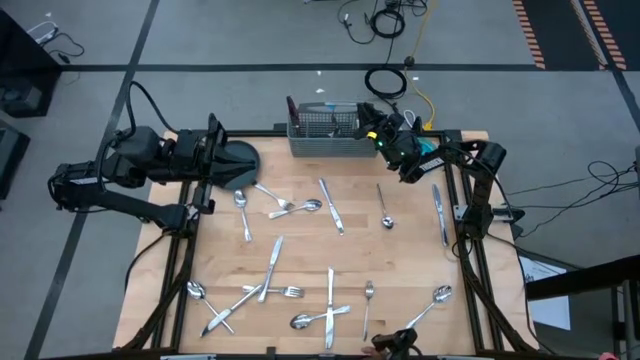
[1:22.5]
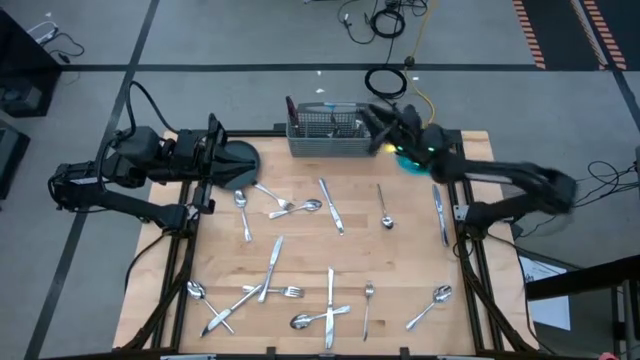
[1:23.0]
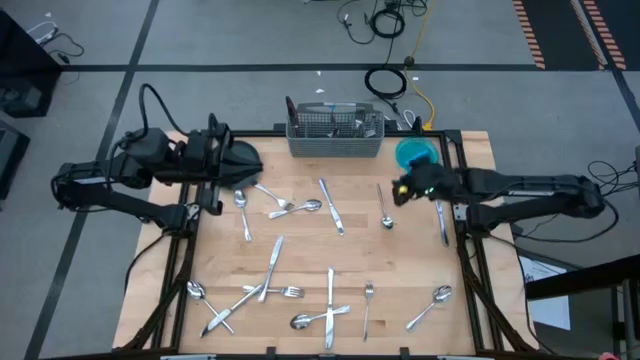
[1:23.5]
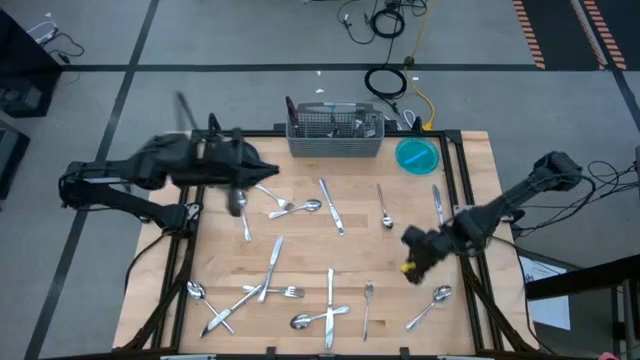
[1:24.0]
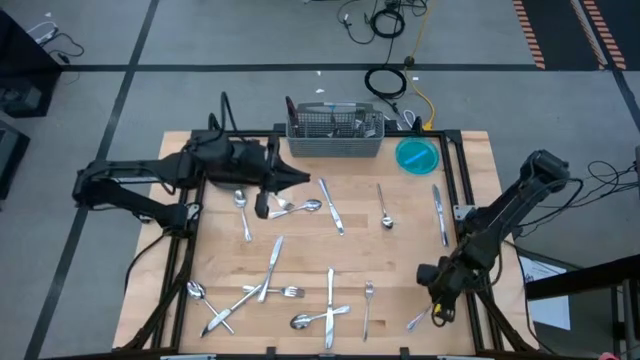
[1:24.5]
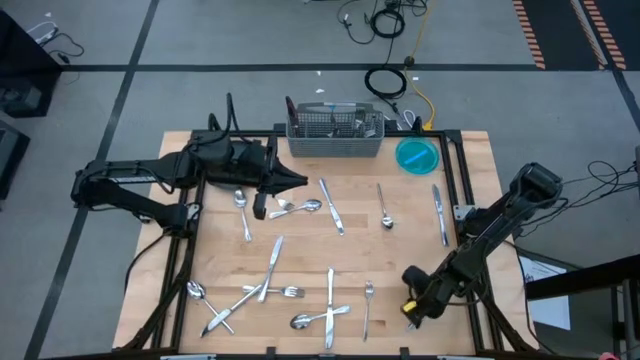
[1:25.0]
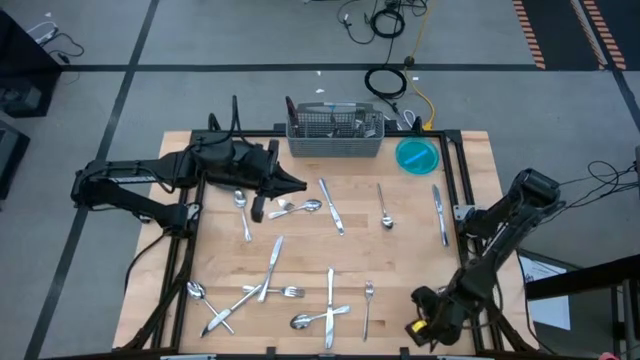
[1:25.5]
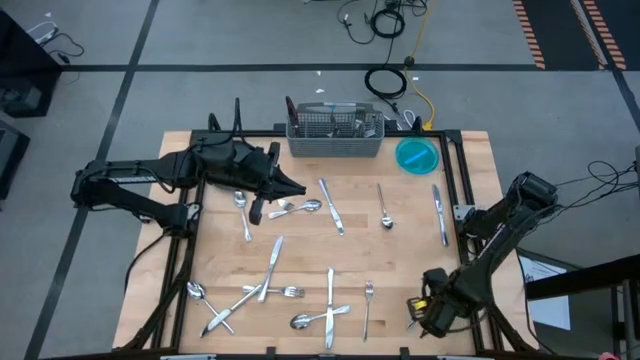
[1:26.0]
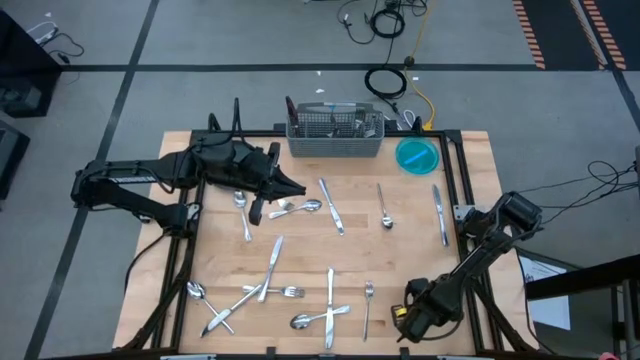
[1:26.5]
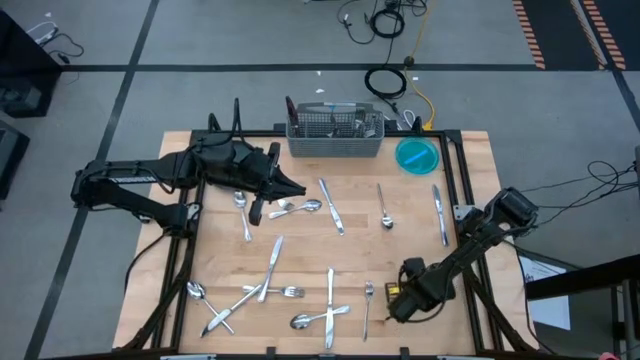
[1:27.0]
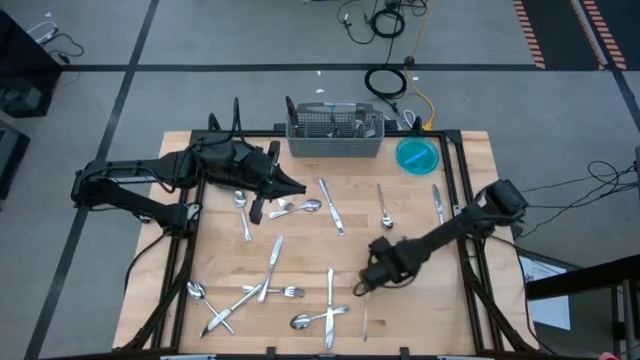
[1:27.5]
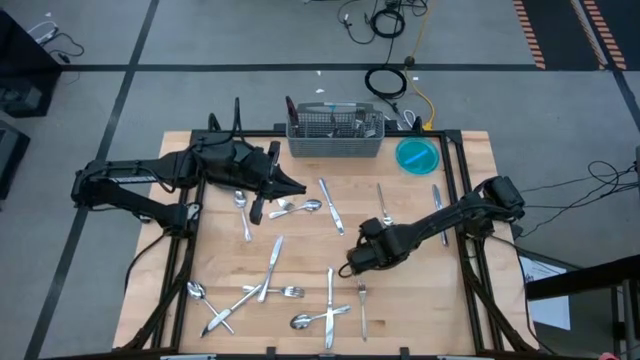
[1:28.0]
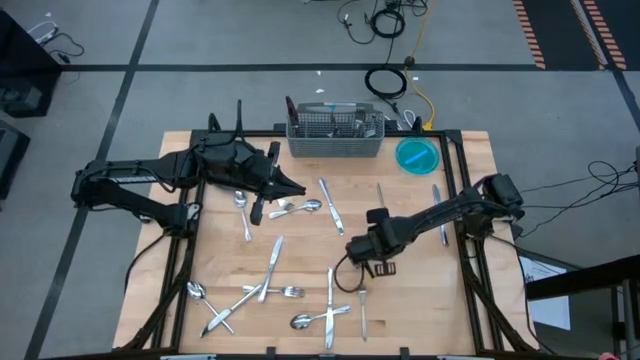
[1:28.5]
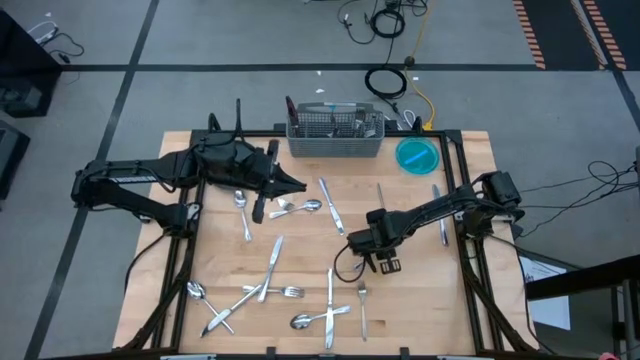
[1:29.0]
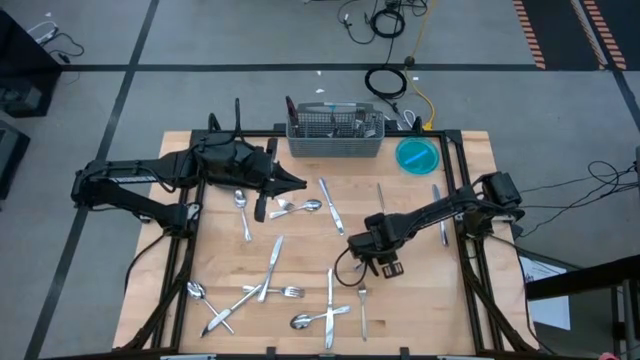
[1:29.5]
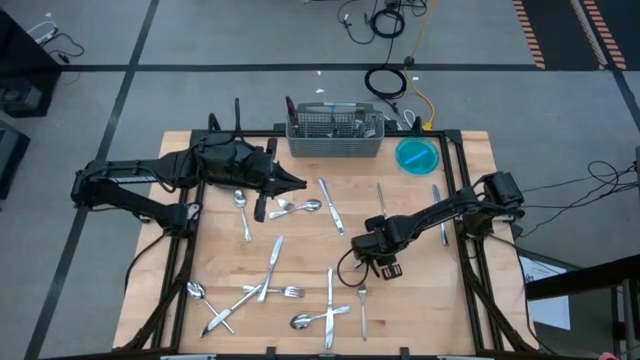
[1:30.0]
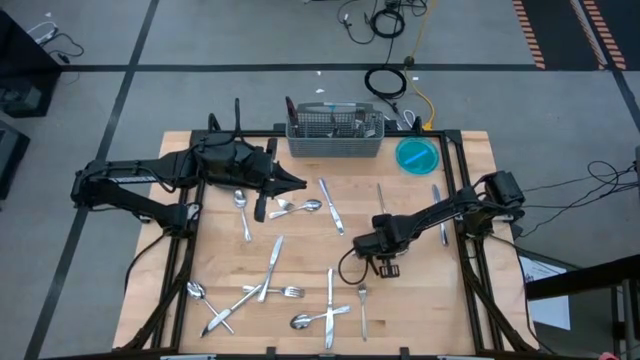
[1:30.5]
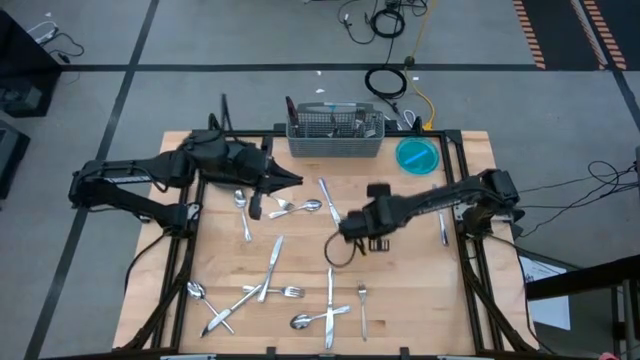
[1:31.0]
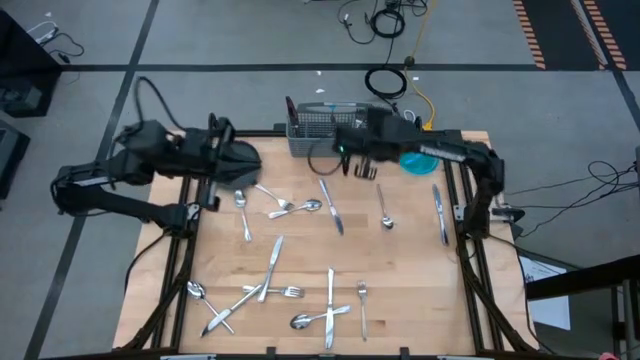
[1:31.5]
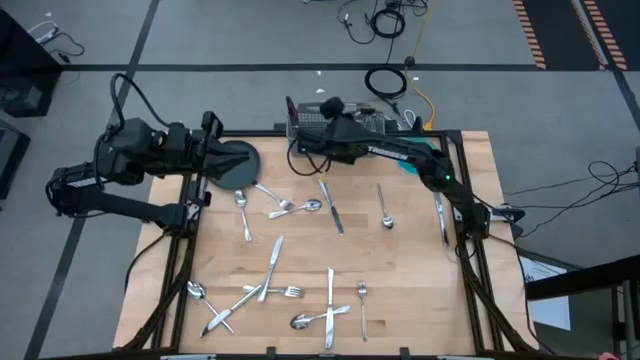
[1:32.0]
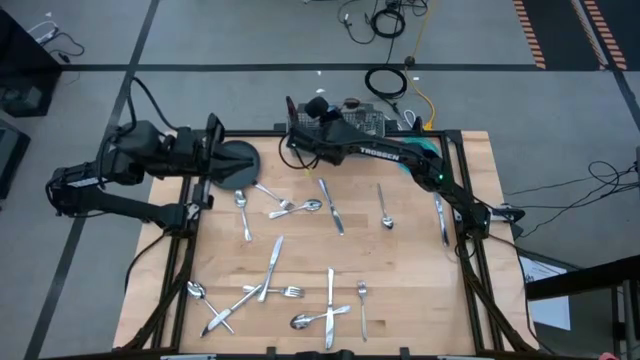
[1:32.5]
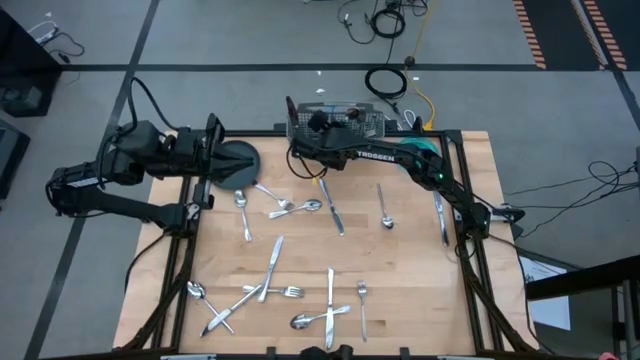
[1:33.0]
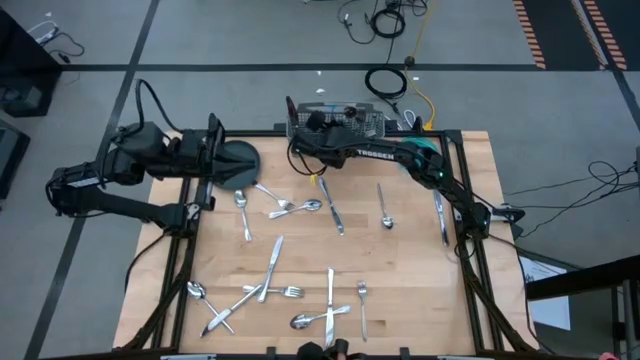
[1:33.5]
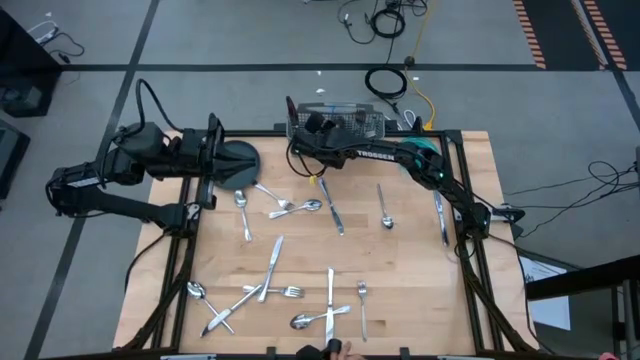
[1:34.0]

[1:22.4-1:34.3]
Task: Sort silverware
Put the spoon into the silverware organizer

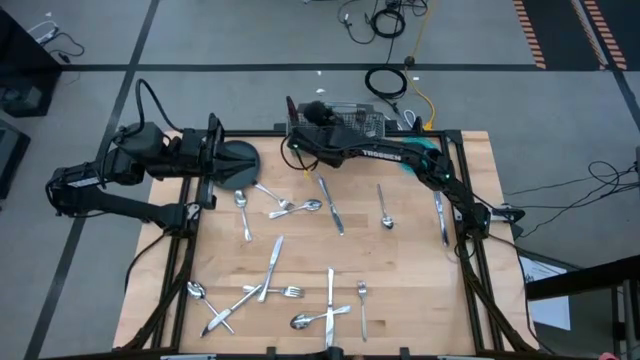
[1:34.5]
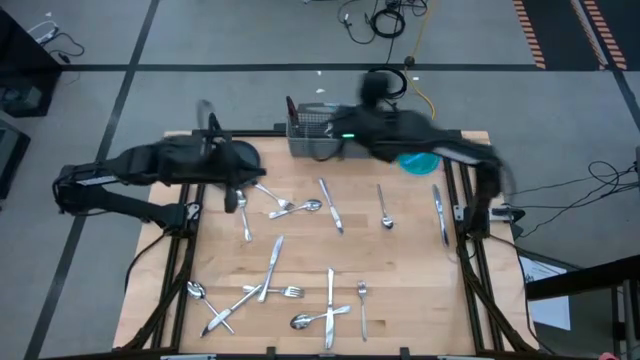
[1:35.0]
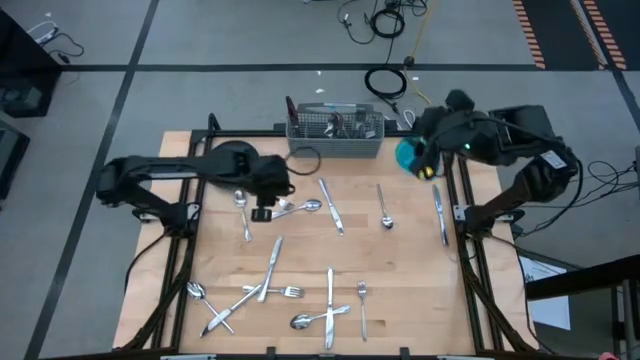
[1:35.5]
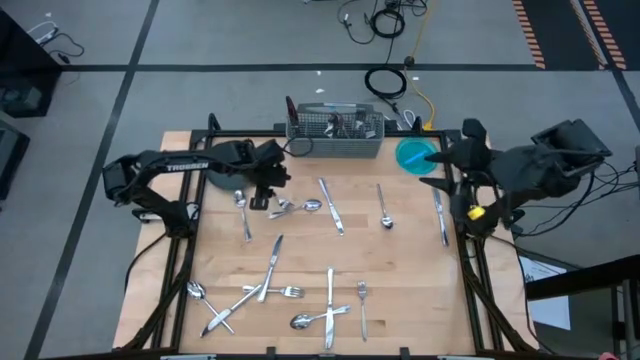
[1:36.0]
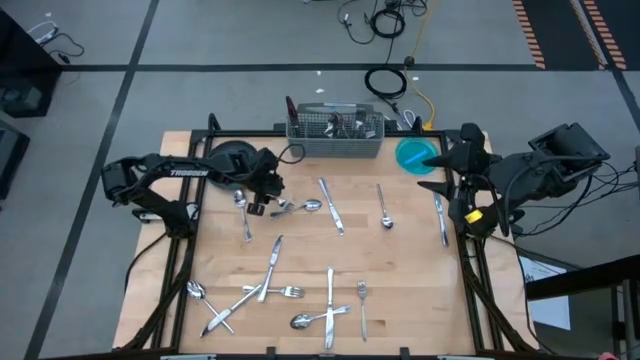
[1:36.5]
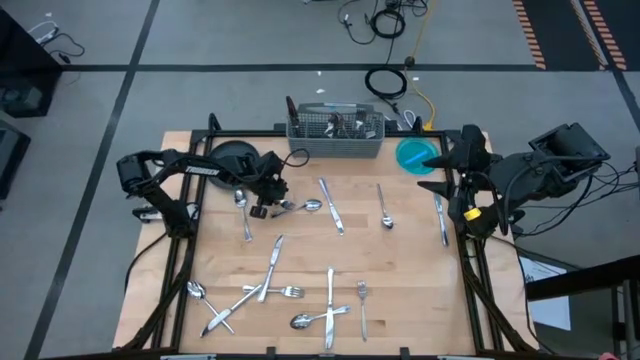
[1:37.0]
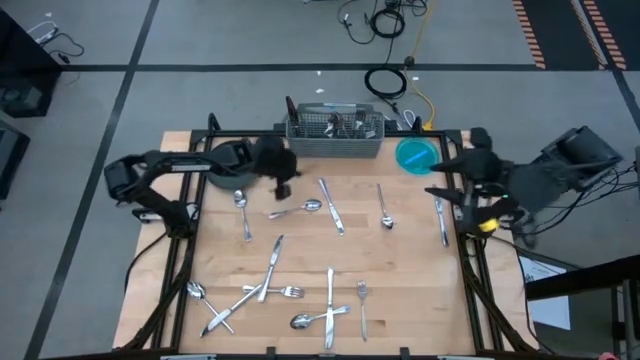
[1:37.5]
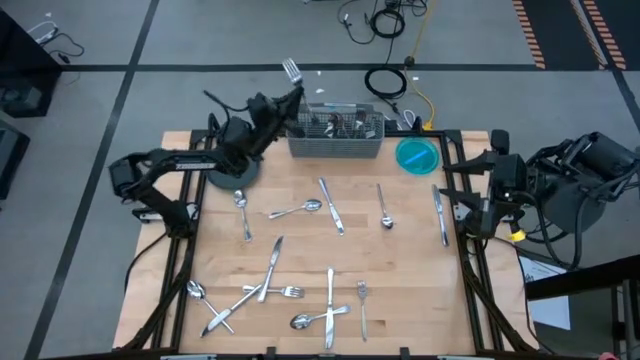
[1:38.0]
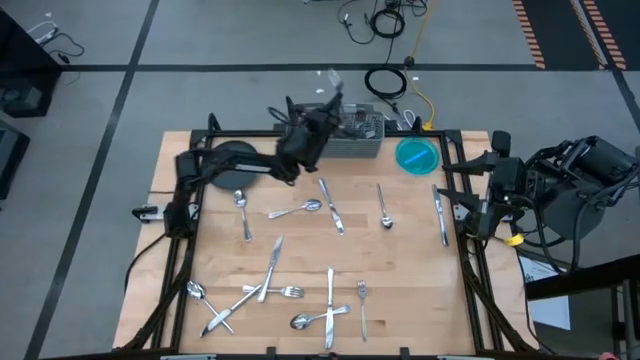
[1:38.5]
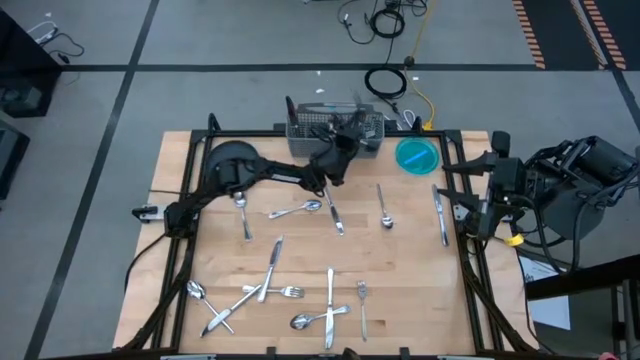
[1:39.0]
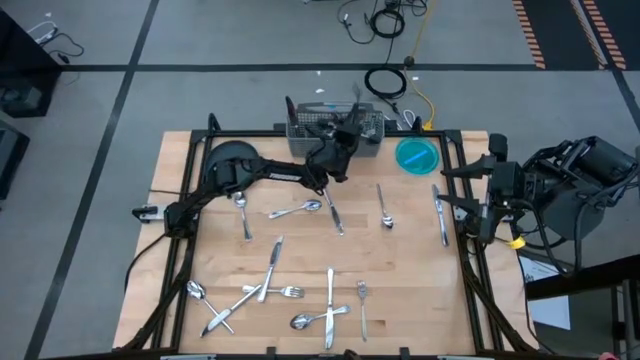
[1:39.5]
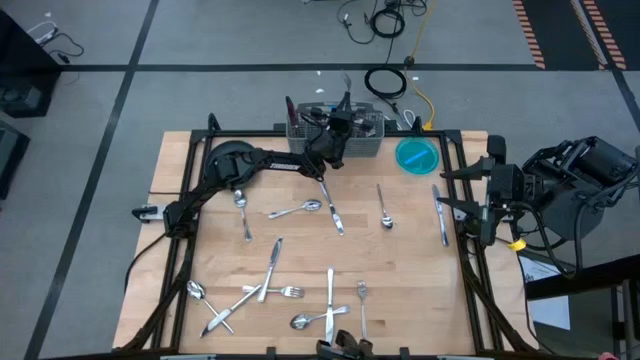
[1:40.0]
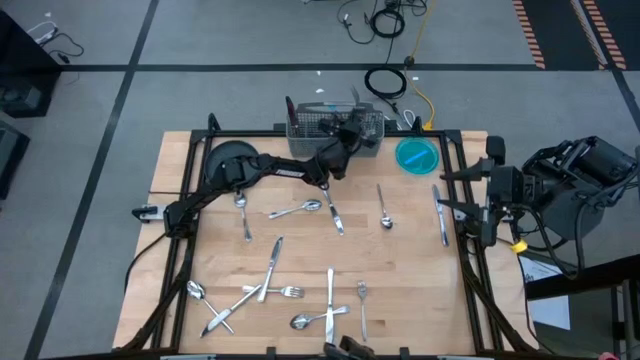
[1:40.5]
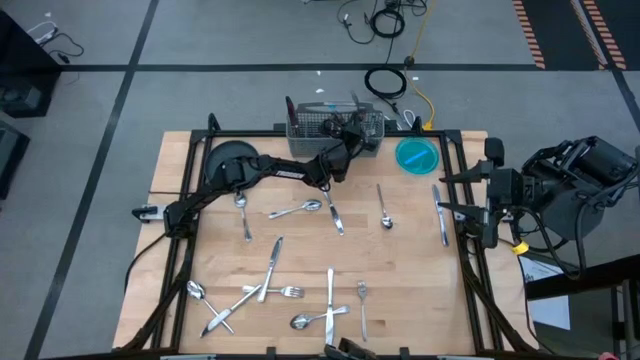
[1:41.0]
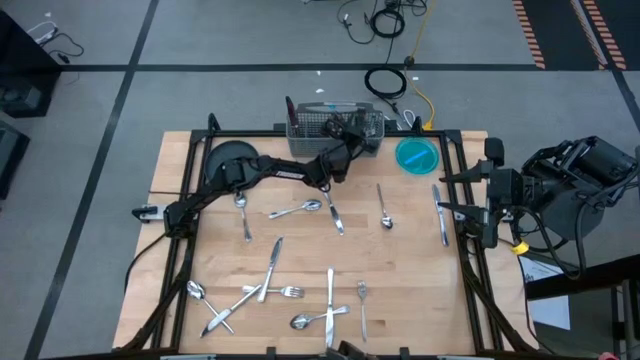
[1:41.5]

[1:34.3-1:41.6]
Put the fork into the silverware organizer

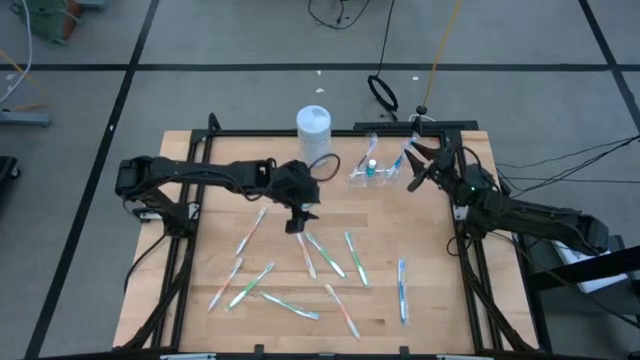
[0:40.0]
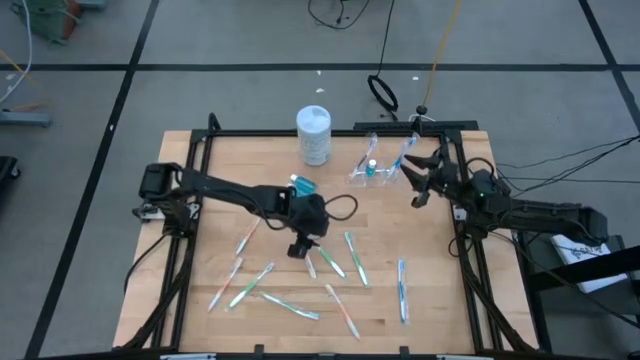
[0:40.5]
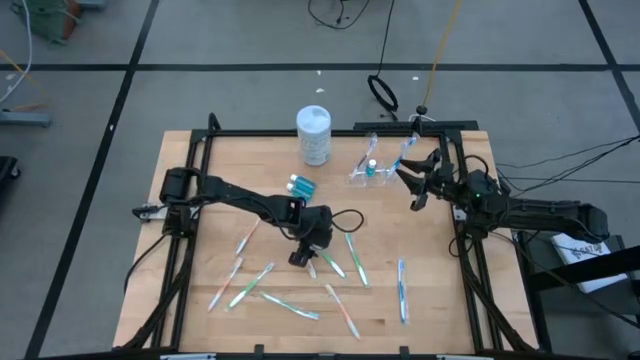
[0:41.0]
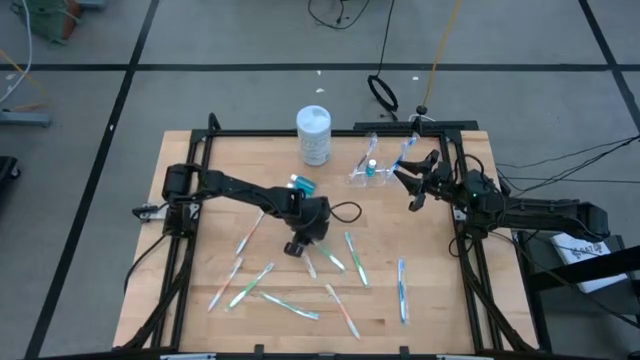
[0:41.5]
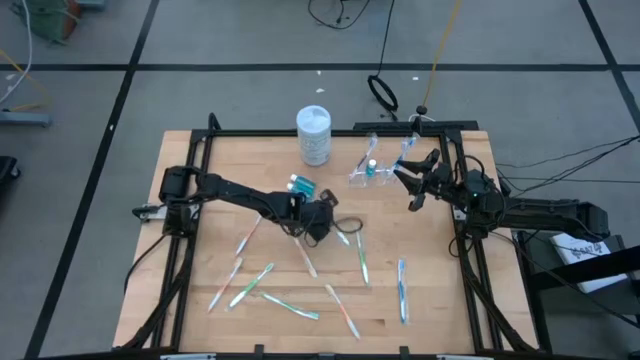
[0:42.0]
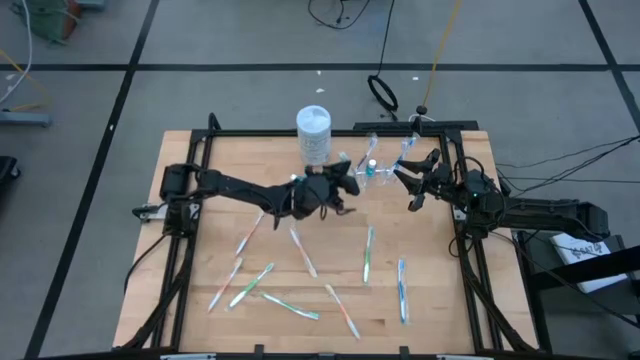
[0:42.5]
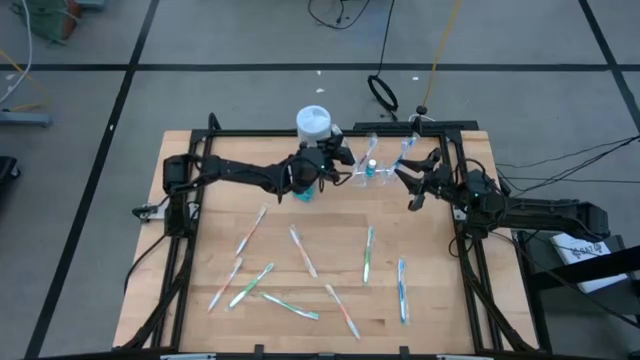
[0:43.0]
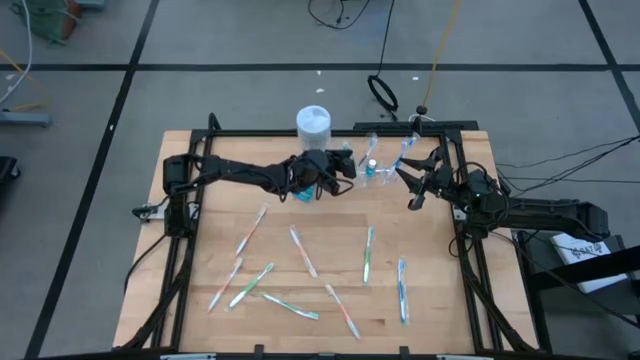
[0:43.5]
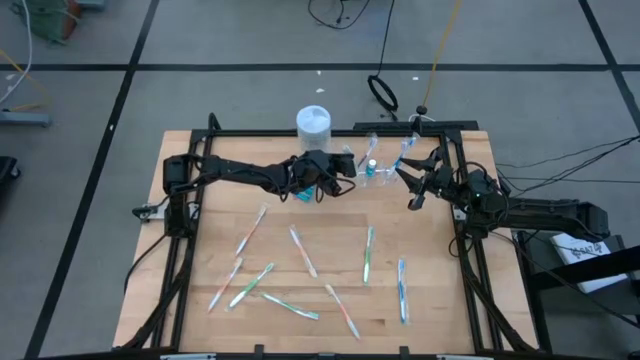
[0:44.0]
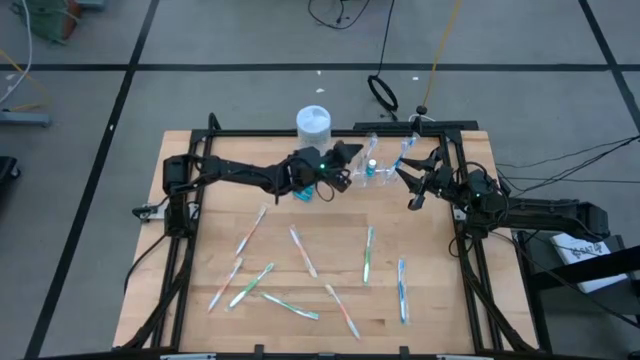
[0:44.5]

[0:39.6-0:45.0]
Task: Pick & Place toothbrushing station
Put the green toothbrush into the transparent organizer
